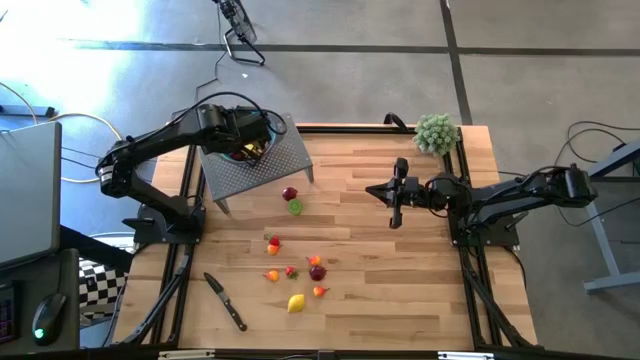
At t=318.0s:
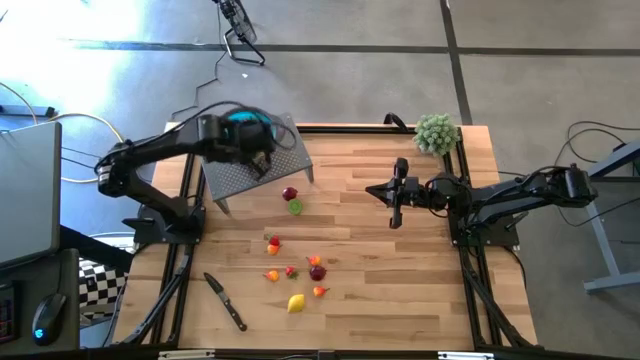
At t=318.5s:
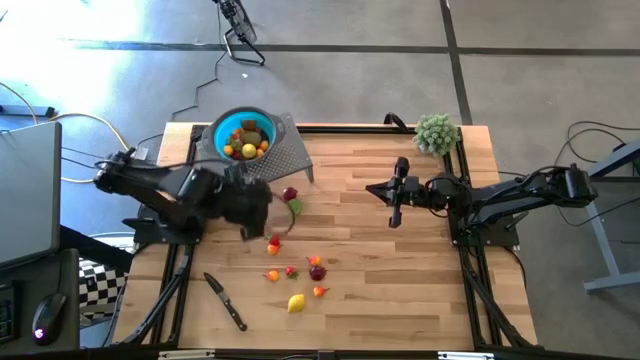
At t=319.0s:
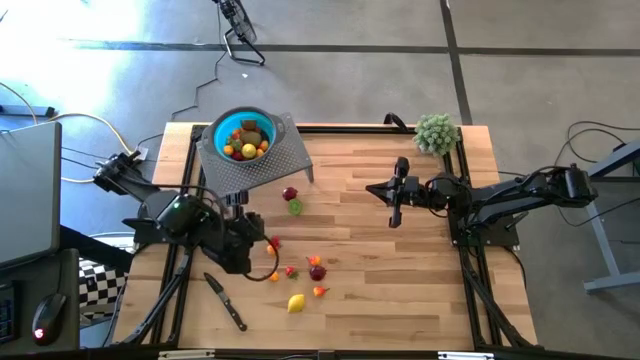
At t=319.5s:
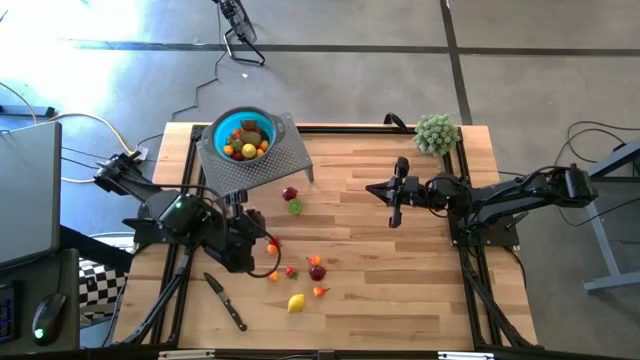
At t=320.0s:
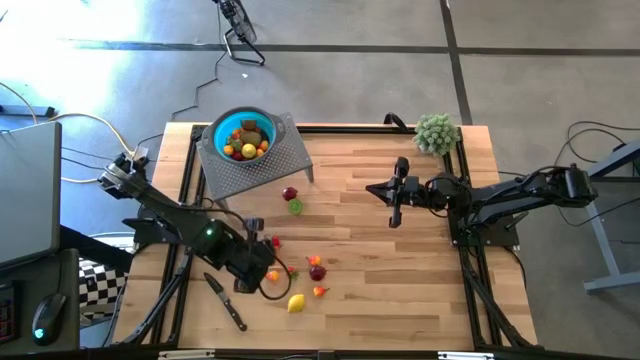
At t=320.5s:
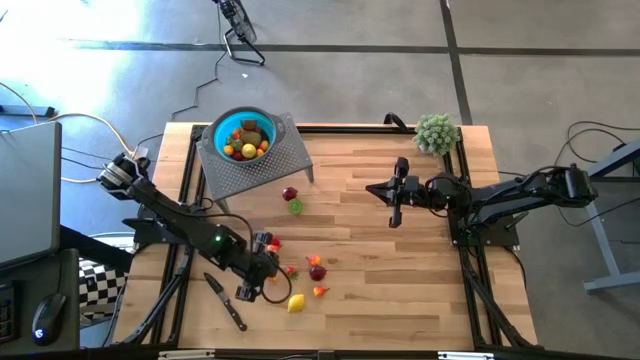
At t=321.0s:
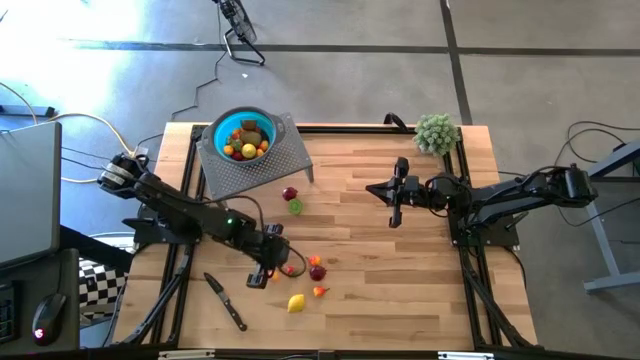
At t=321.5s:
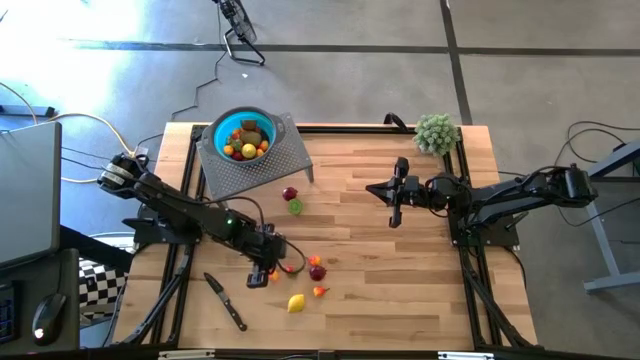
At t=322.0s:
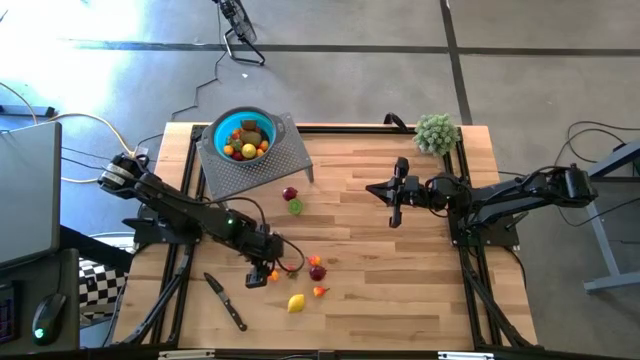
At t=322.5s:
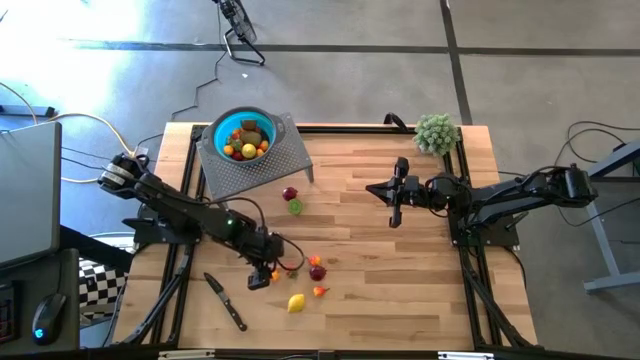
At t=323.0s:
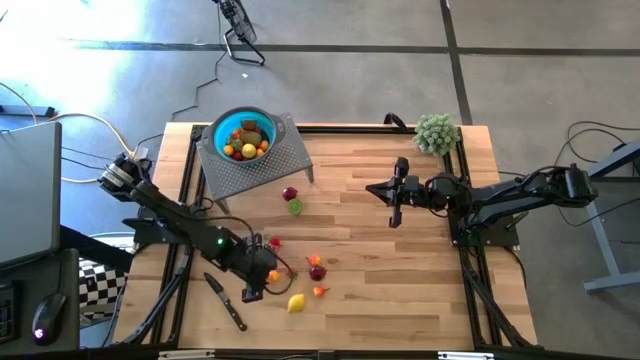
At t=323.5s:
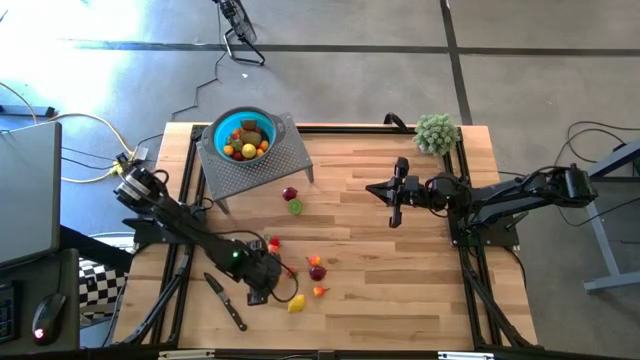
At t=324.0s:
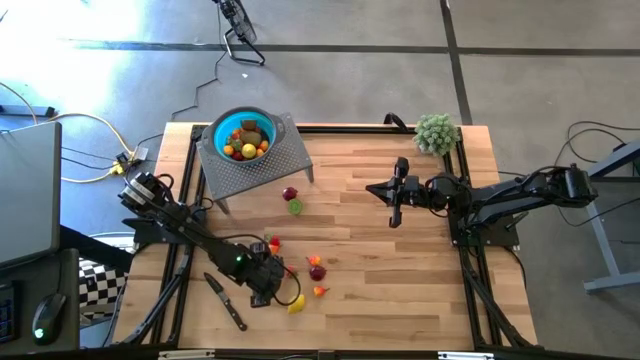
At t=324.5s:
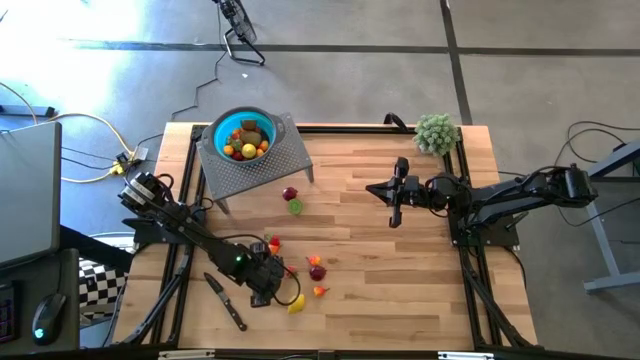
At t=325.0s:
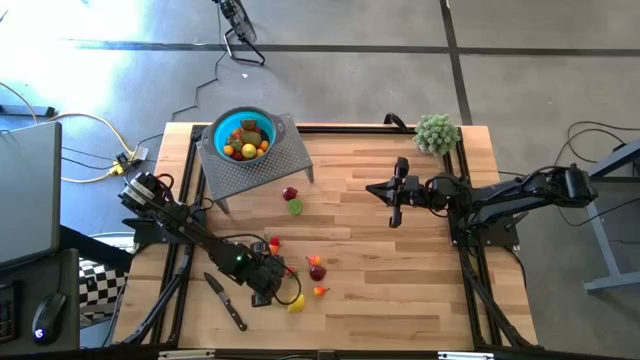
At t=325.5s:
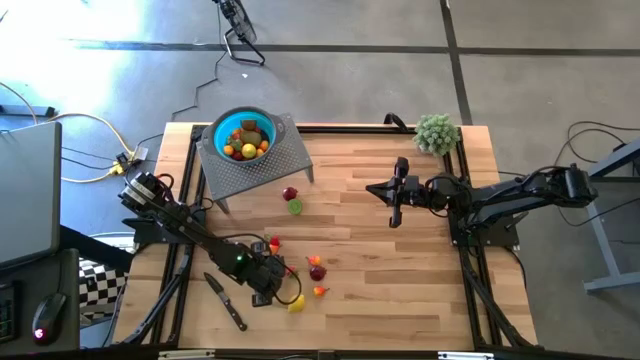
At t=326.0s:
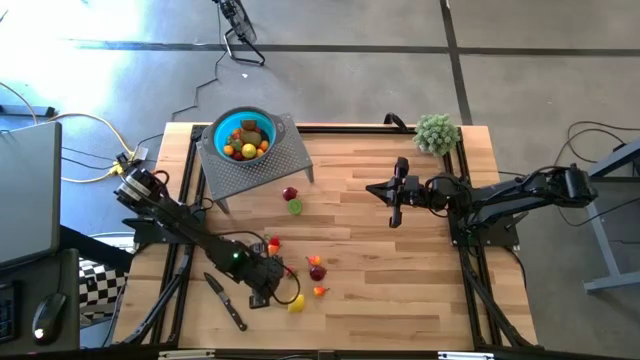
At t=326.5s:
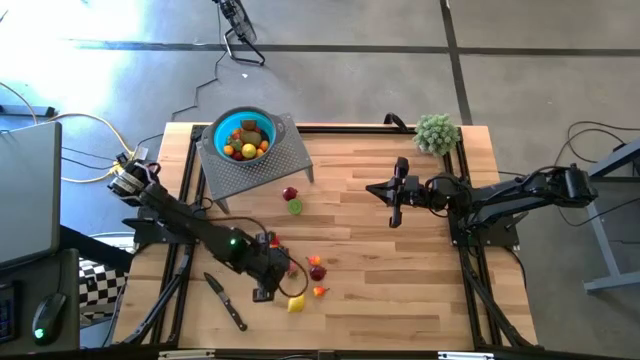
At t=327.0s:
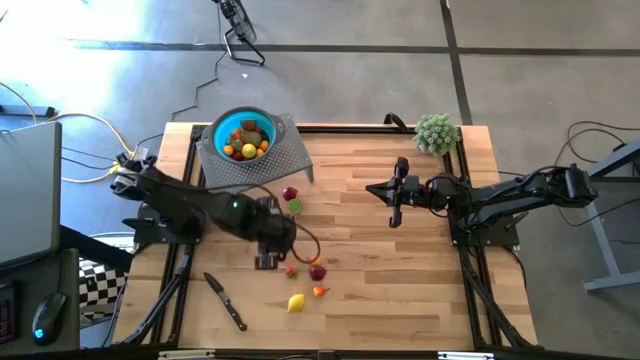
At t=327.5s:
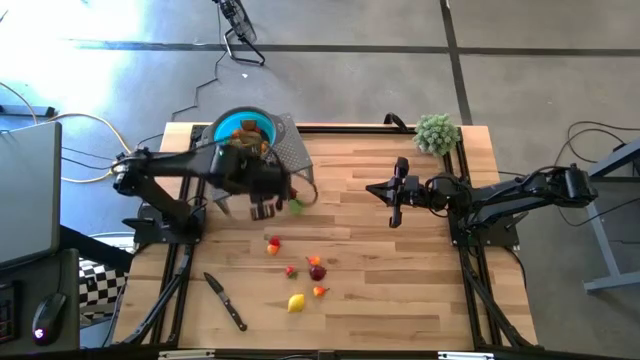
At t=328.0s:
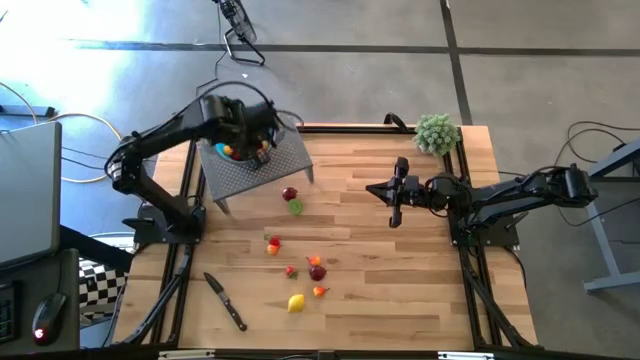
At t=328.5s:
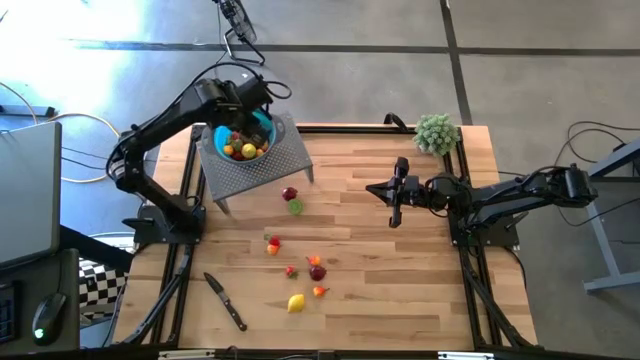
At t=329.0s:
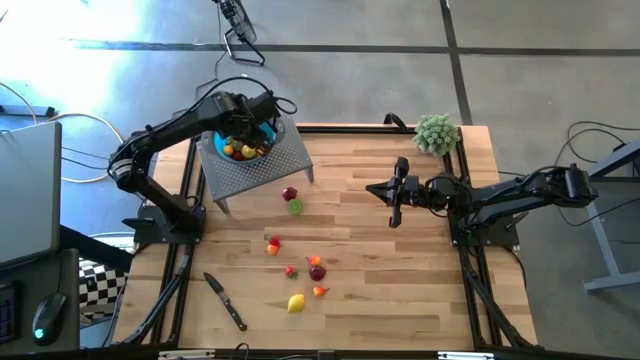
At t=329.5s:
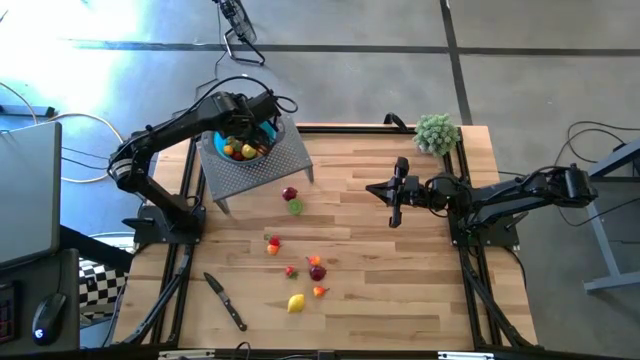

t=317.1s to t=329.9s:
Task: Pick & Place Fruit
Put the orange pear into the blue strainer bowl on the shelf

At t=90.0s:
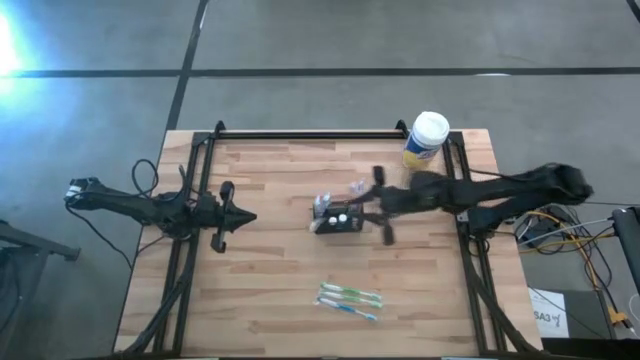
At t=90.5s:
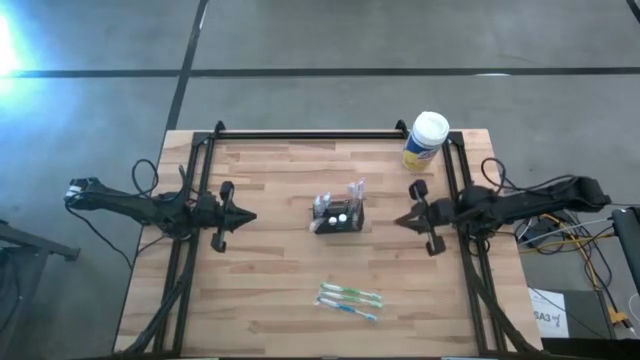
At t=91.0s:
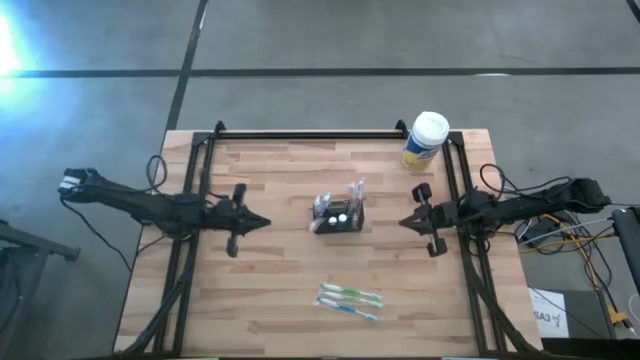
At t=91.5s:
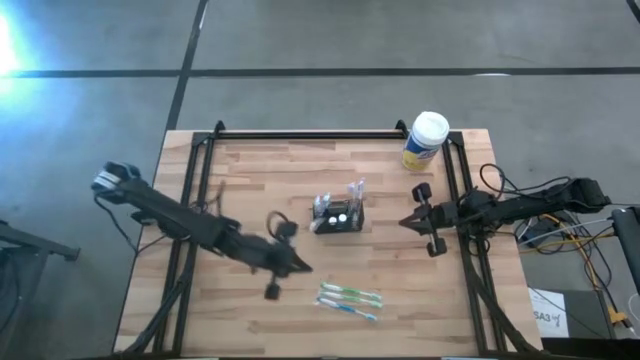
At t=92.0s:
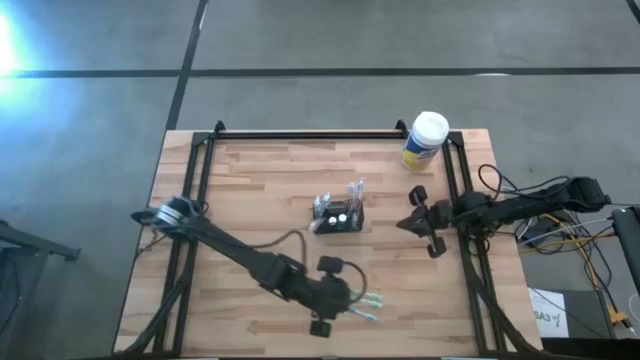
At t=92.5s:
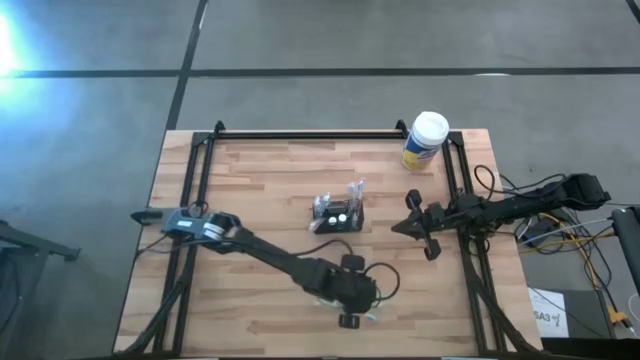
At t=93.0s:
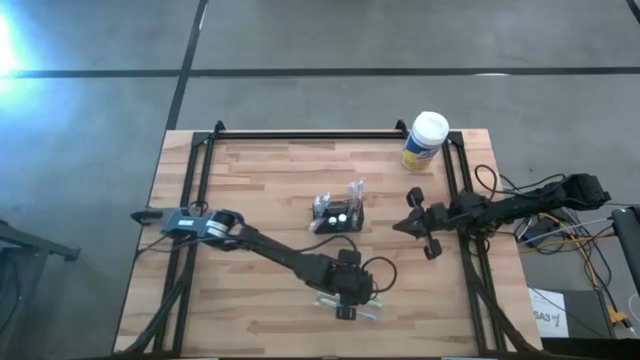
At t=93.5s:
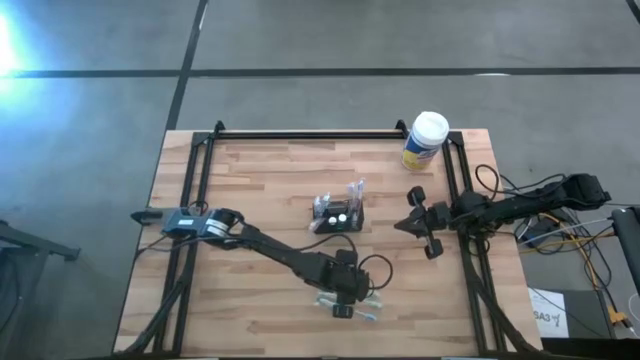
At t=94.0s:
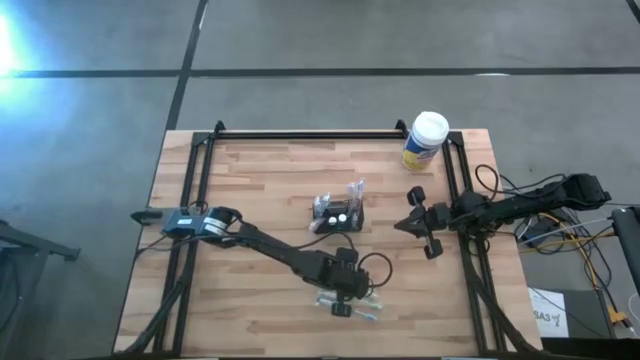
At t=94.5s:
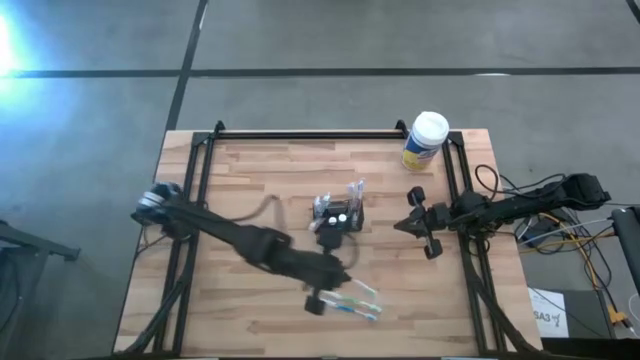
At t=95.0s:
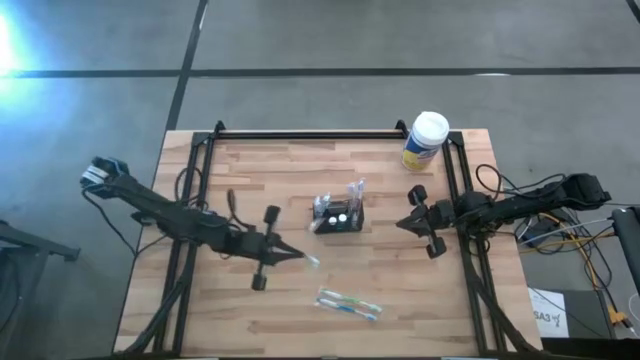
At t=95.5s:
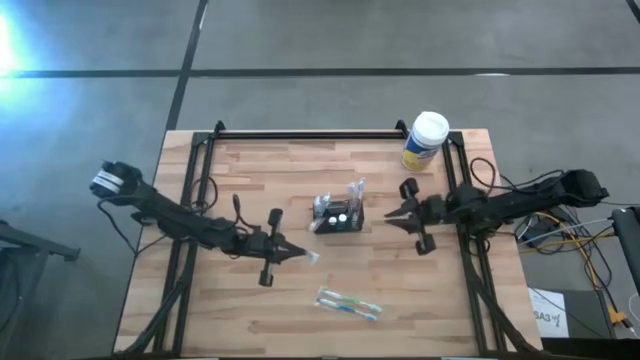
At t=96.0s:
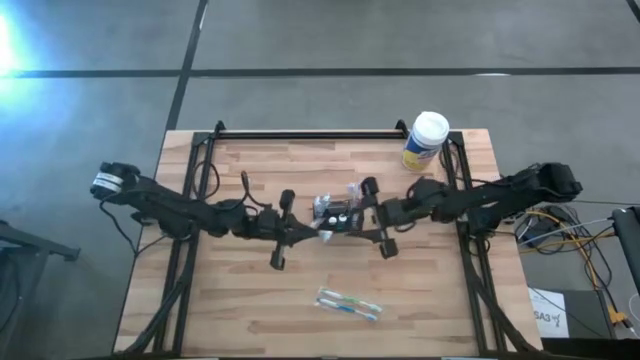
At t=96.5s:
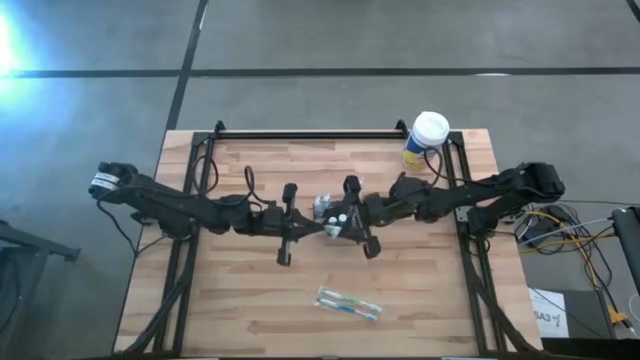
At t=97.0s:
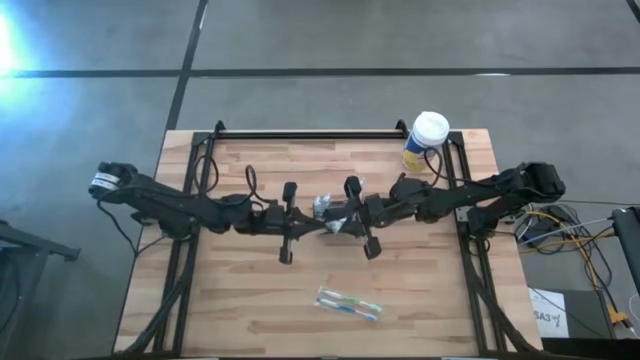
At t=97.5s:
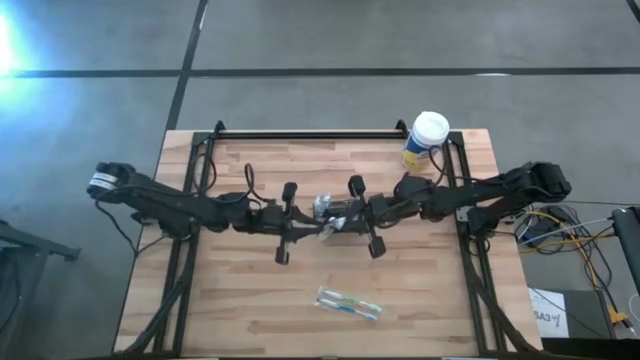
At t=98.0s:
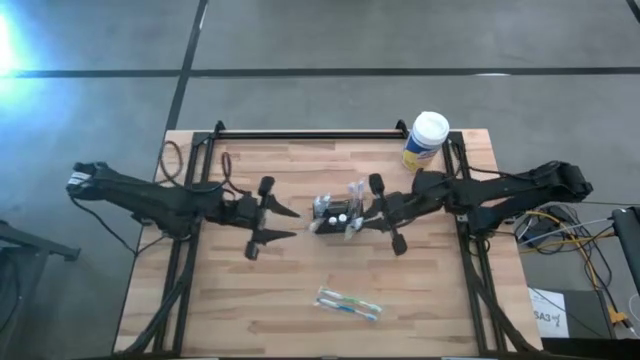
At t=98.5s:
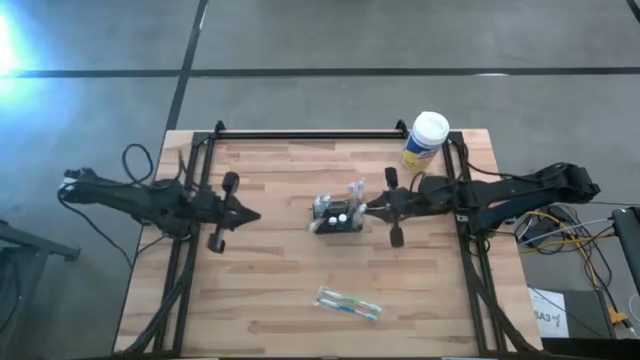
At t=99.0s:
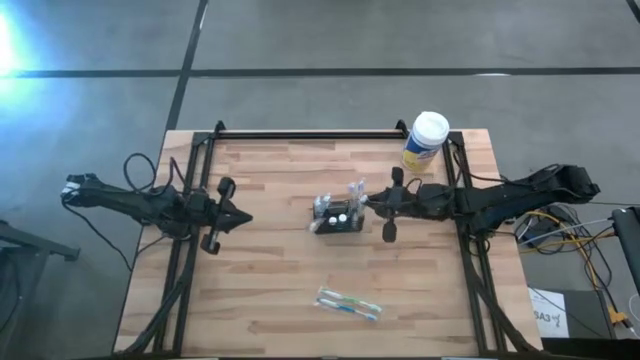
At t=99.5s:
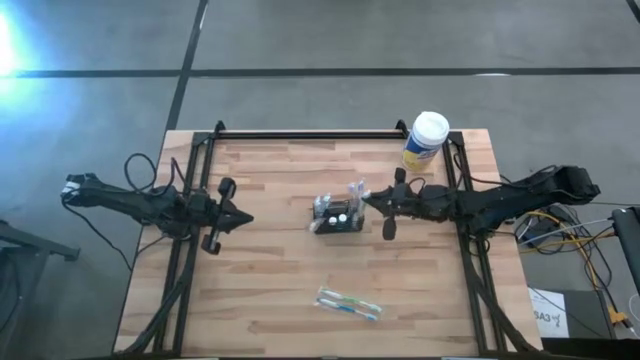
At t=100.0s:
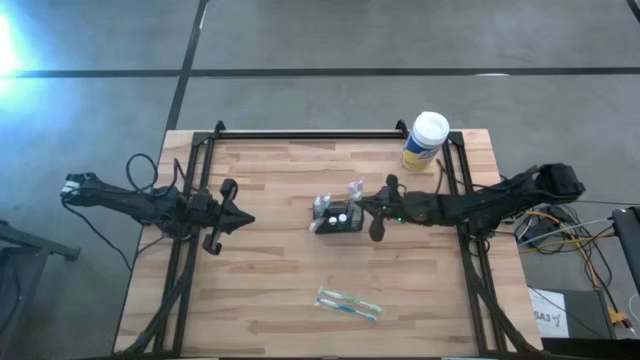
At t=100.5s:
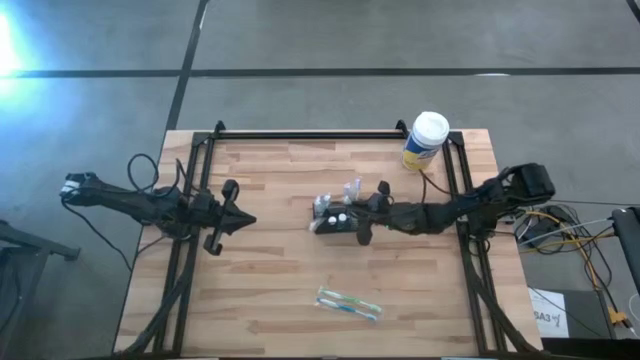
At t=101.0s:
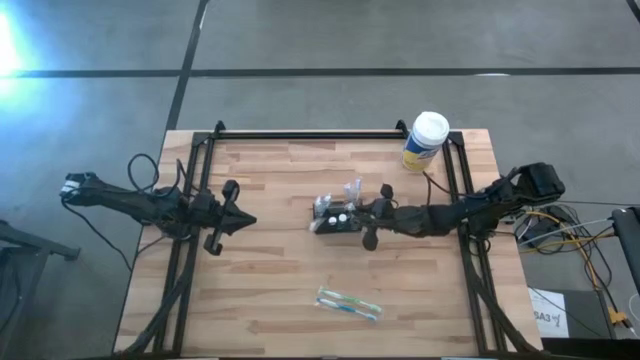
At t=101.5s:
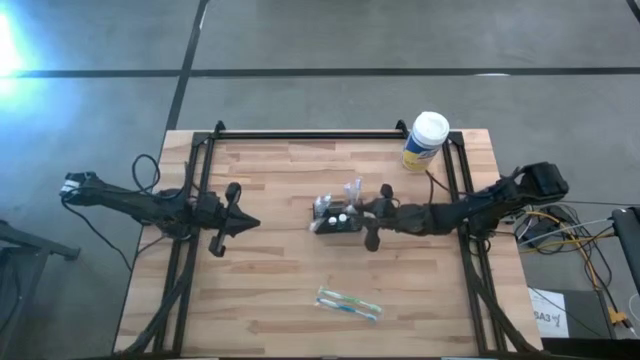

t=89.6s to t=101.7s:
Task: Pick & Place toothbrushing station
Put the top green toothbrush into the wire organizer
